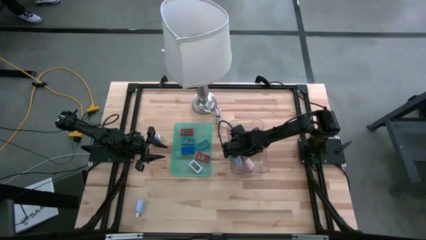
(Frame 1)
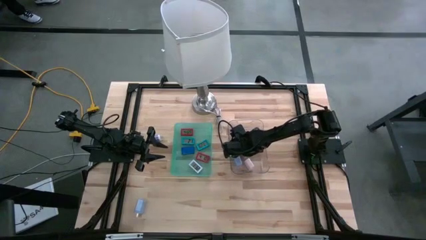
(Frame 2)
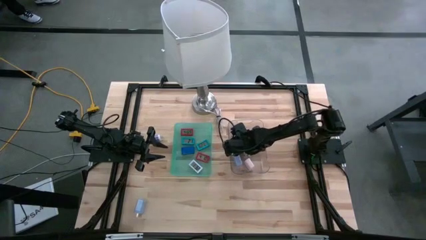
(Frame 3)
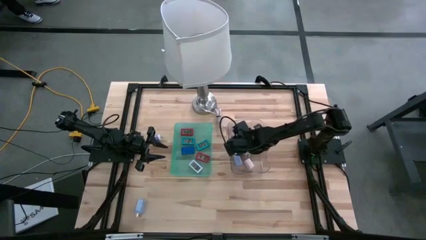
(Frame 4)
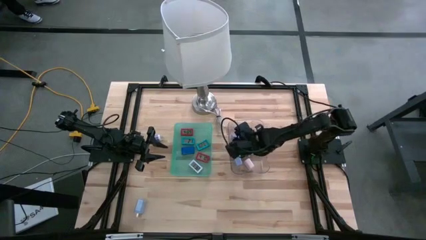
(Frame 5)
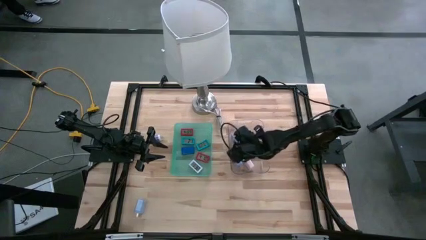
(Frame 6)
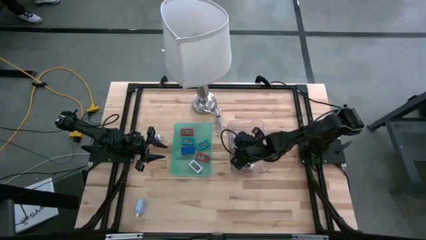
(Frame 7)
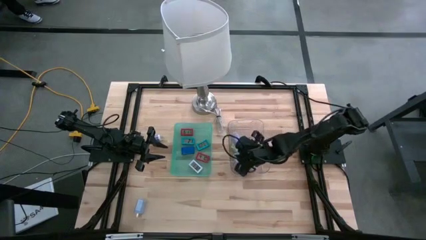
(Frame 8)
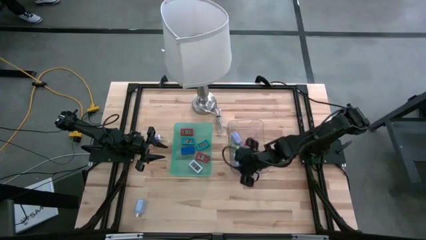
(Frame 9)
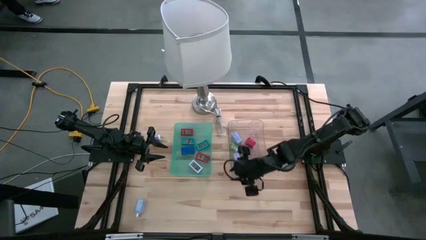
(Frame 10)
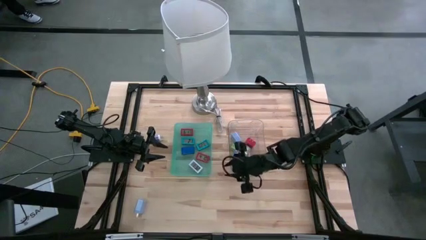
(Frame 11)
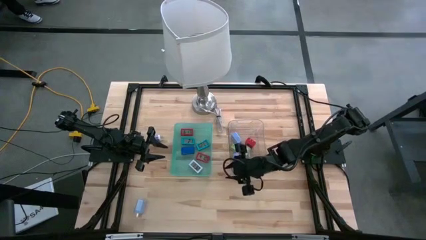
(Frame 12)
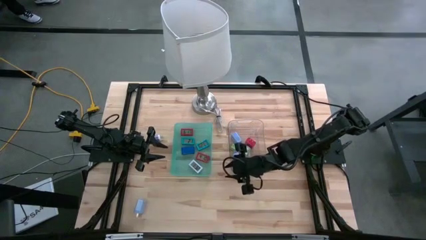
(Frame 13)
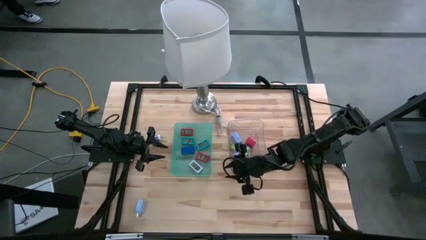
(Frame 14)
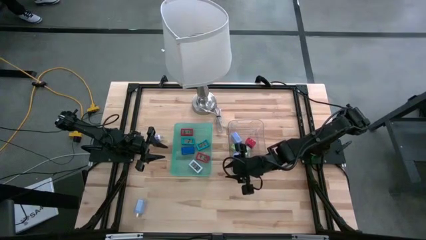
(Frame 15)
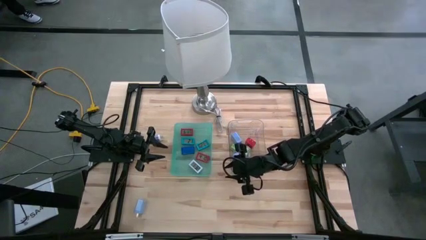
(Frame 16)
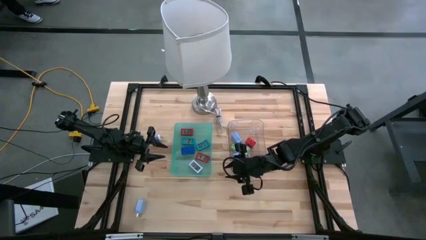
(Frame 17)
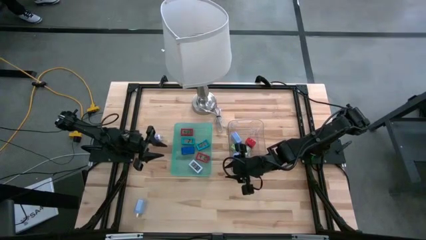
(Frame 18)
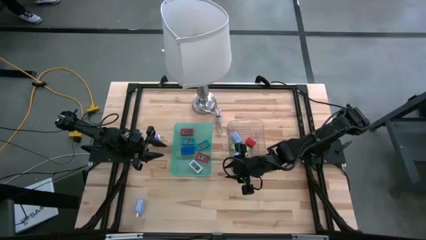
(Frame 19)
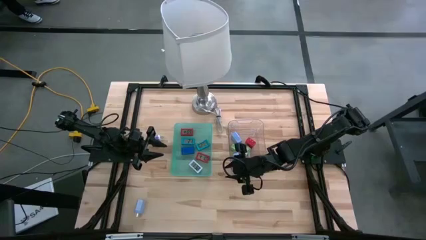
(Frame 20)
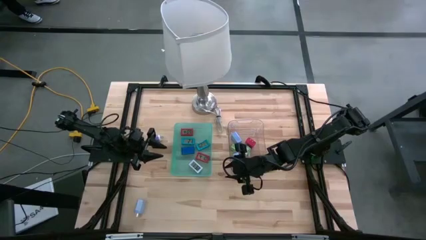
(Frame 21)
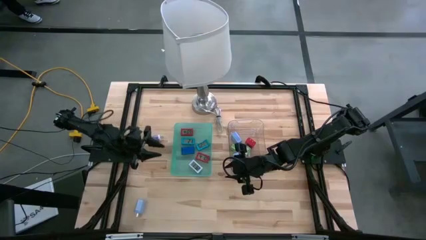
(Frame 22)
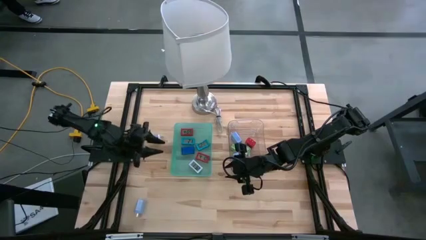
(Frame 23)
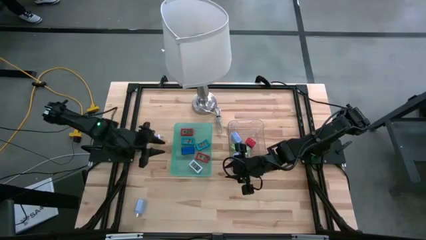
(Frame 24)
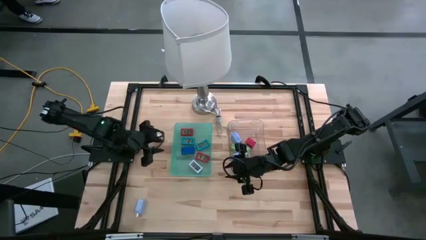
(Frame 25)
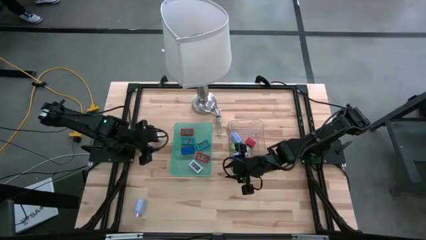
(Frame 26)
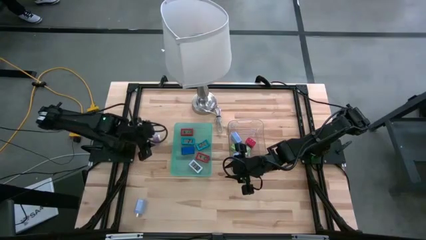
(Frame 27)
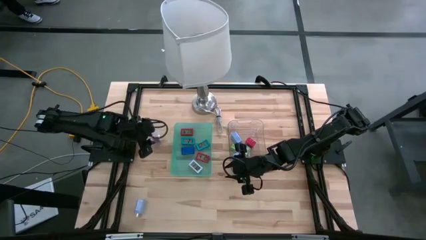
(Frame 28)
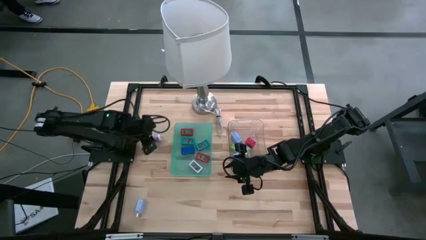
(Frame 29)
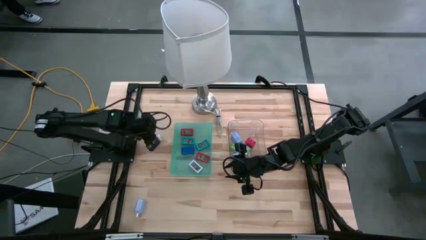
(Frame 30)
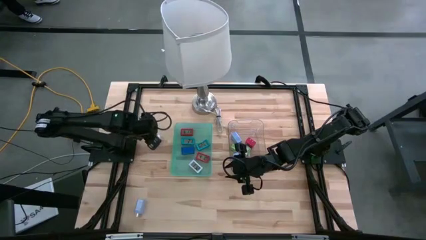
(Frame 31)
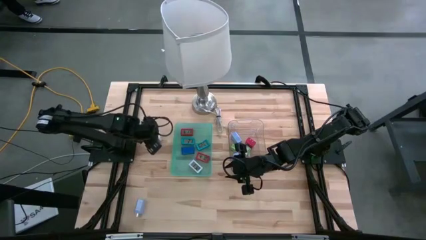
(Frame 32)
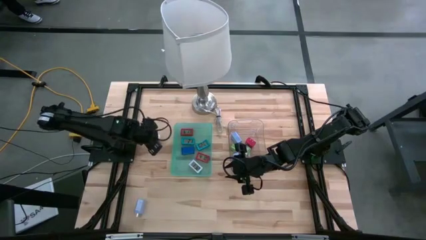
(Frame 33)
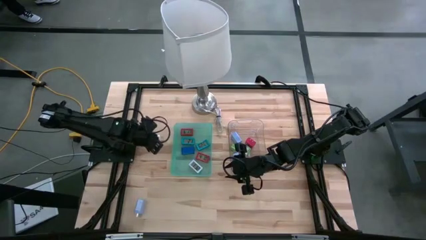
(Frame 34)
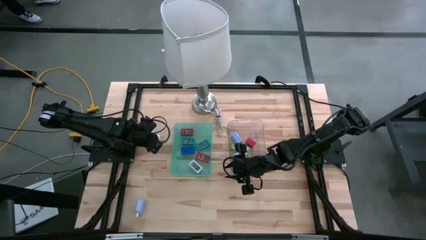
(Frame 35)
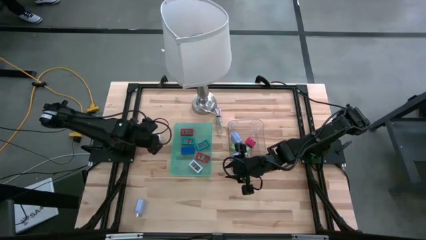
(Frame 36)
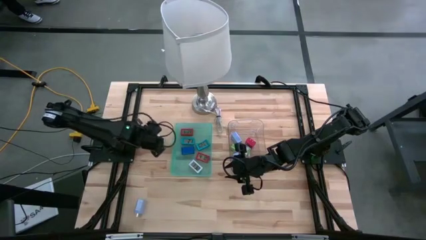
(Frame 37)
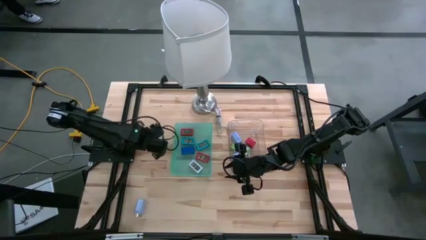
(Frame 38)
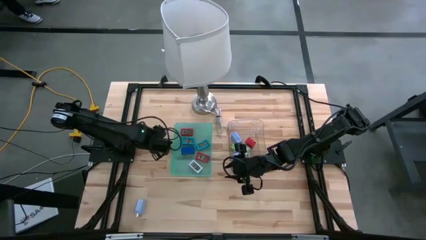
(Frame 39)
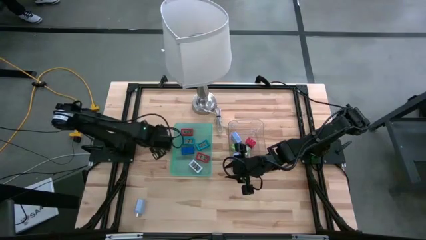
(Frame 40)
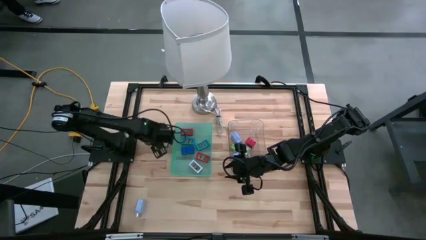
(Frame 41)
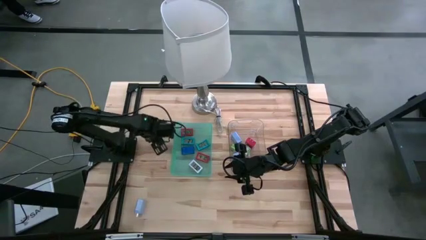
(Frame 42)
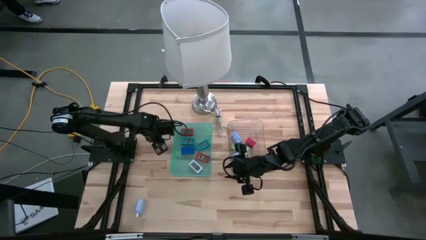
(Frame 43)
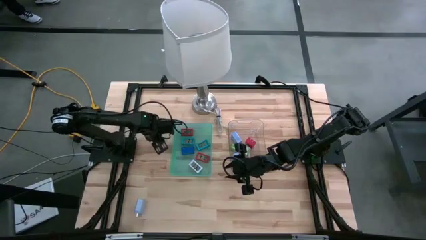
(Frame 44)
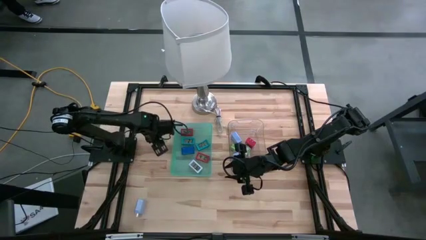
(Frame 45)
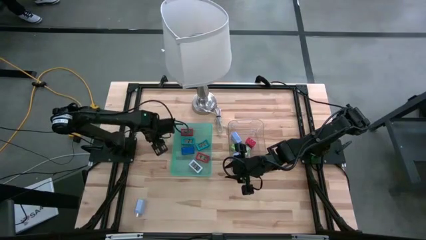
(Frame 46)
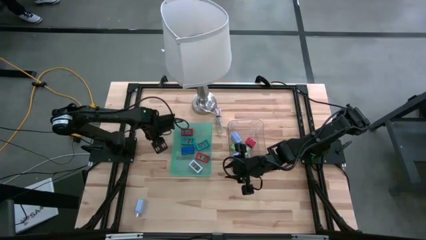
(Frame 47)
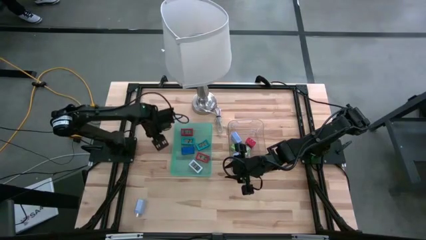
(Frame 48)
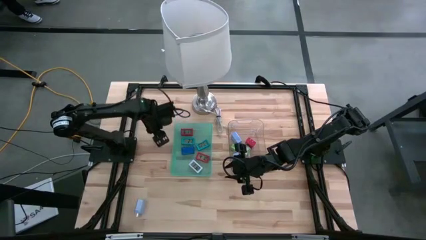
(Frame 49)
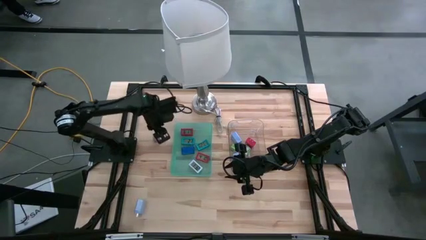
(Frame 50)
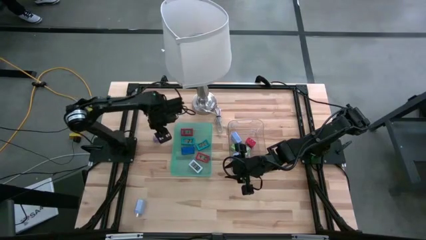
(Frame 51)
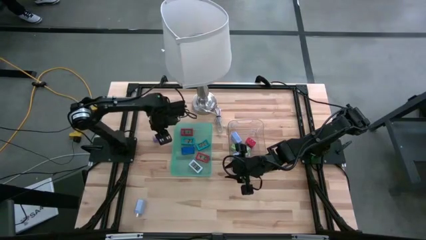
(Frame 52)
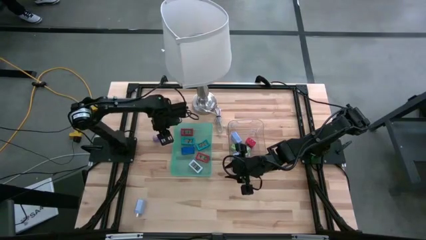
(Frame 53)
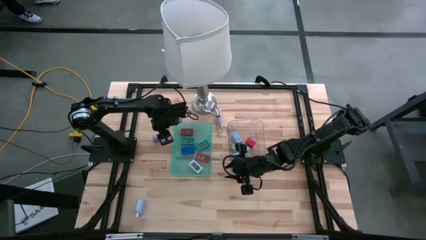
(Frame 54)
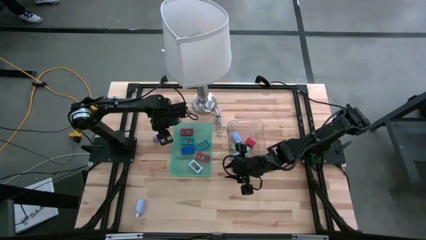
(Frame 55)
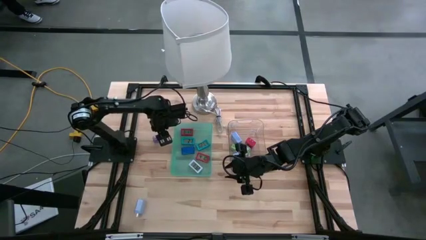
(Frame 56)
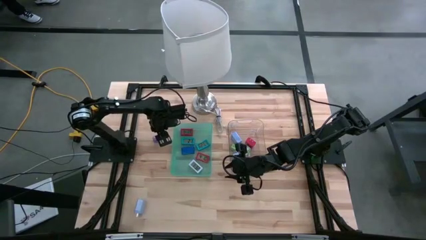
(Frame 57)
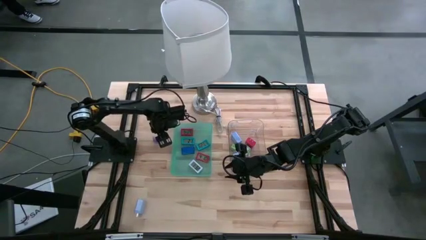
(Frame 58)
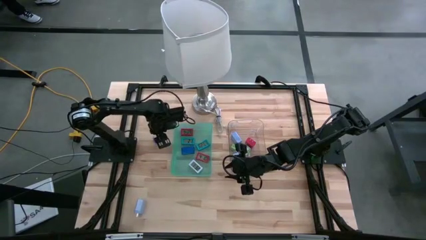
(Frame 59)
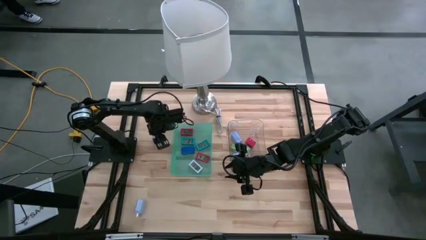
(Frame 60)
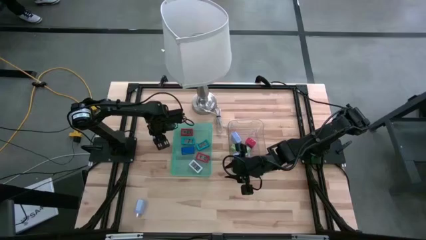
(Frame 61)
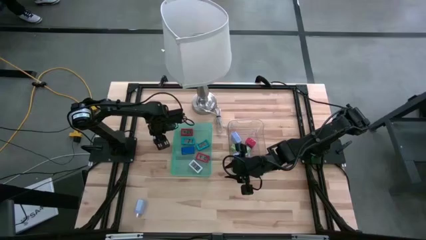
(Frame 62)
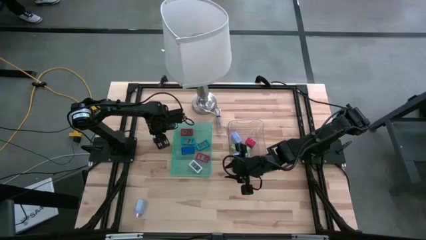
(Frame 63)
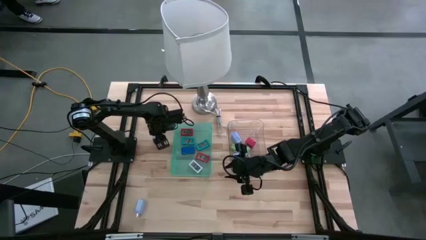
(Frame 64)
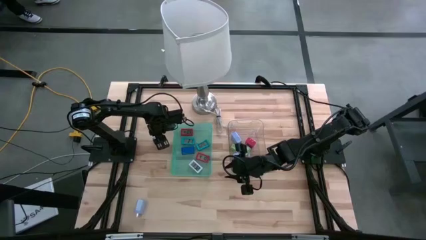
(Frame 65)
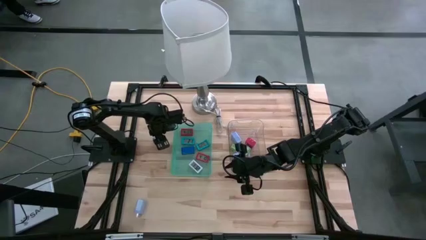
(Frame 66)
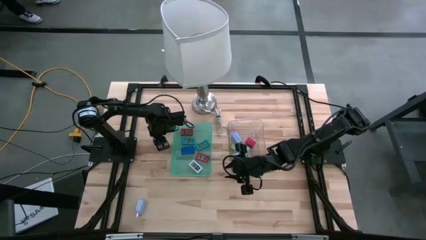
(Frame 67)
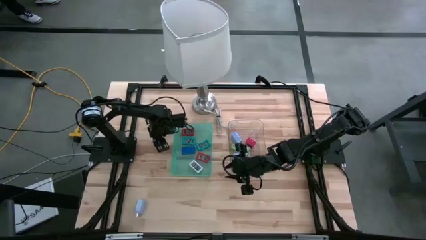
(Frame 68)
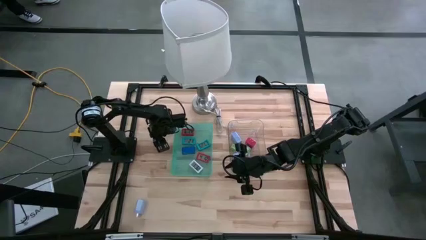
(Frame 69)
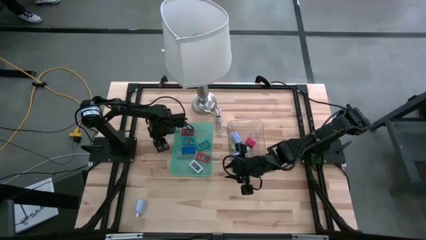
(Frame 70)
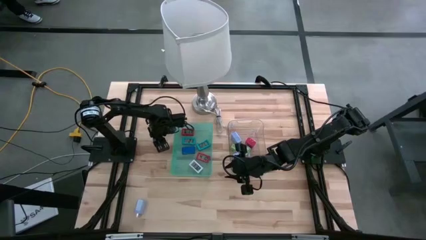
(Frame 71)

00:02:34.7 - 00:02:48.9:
Task: Pick & Place Office items
Put the purple charger adapter into the transparent bin

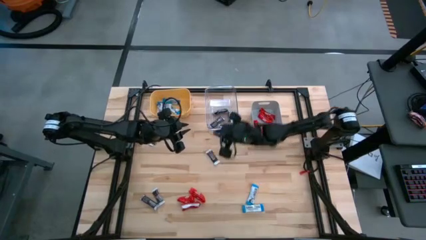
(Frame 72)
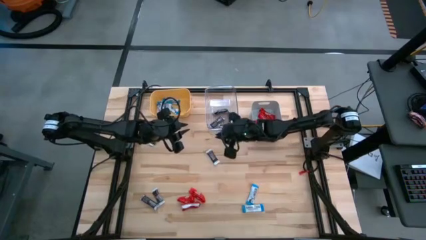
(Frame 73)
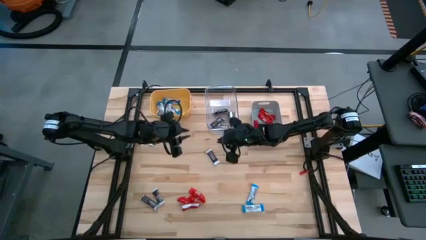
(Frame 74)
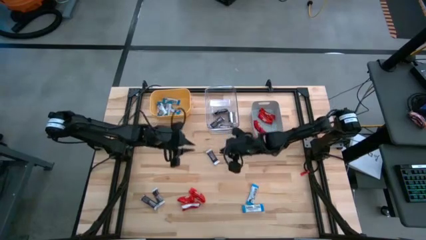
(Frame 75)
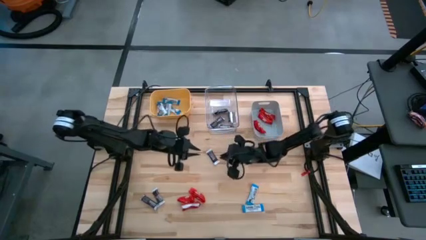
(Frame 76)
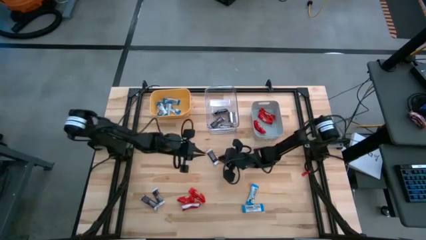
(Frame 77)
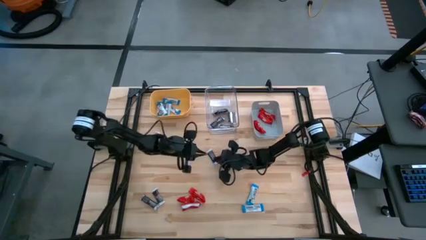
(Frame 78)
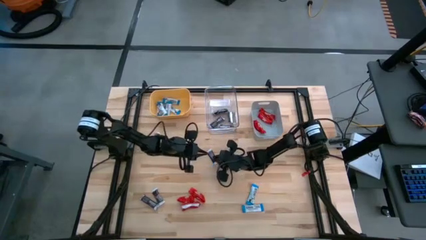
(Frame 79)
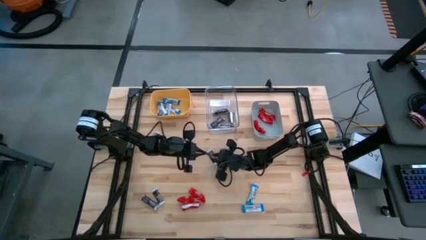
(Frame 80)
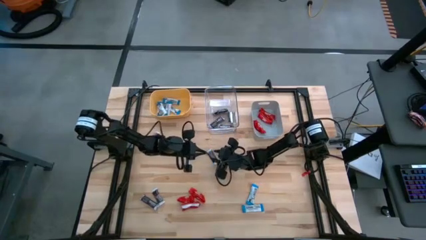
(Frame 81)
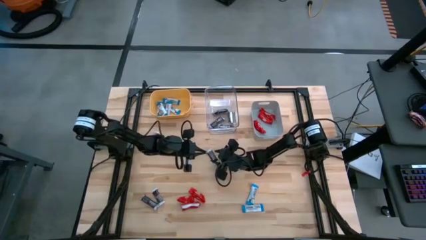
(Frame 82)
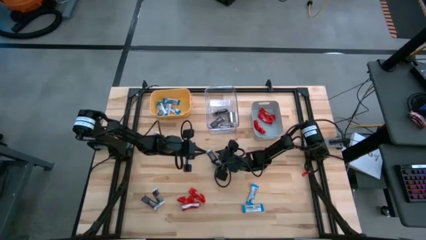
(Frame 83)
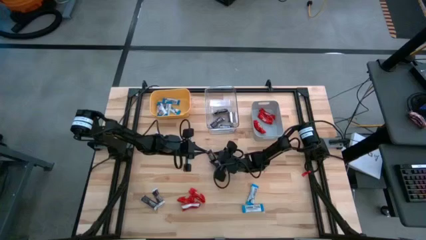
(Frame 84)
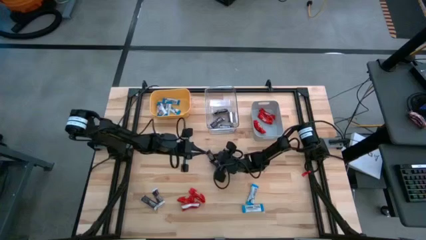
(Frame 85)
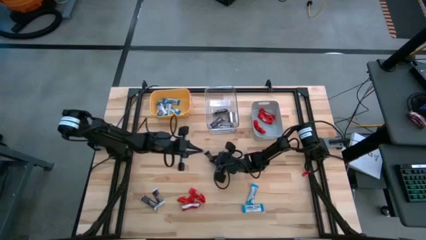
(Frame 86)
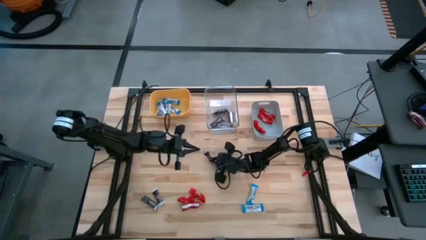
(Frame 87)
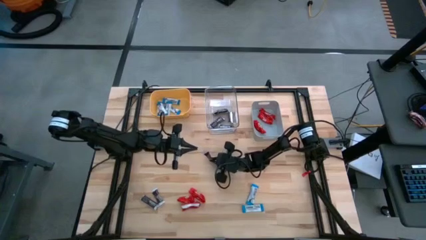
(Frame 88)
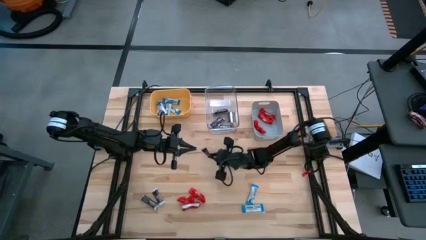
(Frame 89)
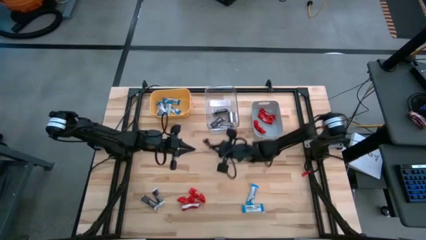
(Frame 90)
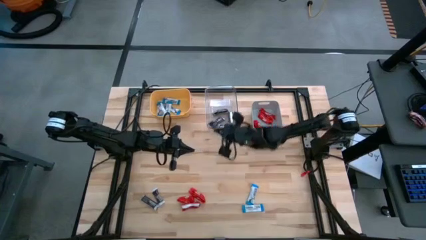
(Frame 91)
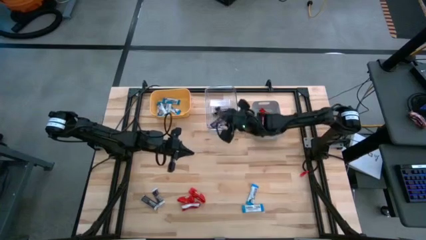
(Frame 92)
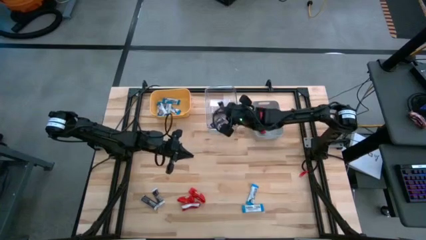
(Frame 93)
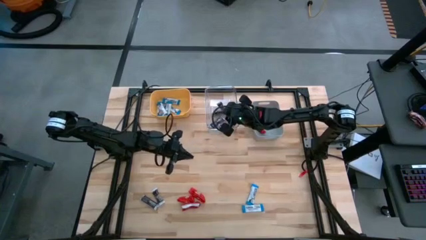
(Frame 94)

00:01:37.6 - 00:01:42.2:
Task: Sort candy
Put the brown chocolate into the transparent bin
